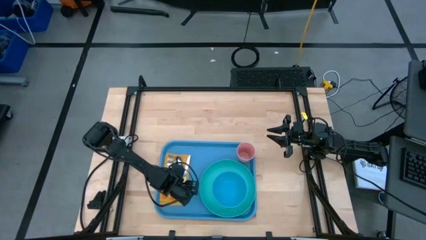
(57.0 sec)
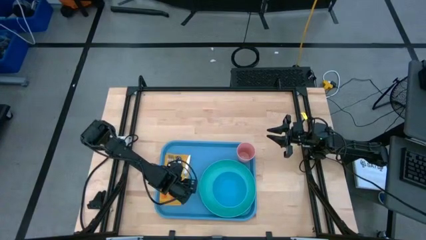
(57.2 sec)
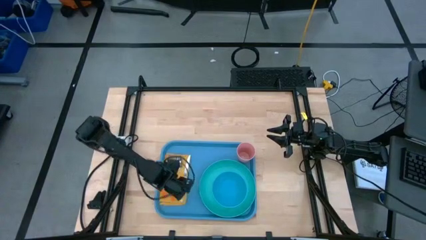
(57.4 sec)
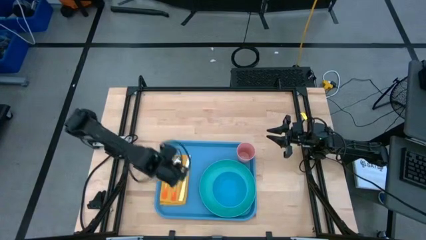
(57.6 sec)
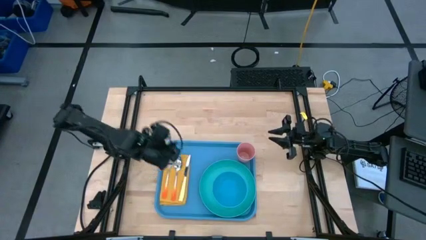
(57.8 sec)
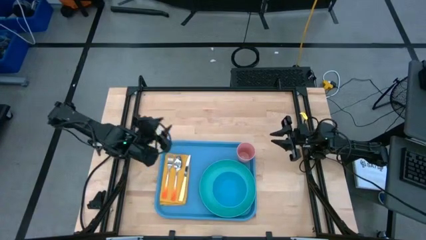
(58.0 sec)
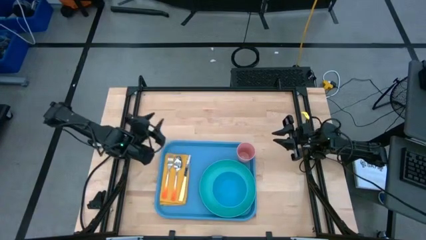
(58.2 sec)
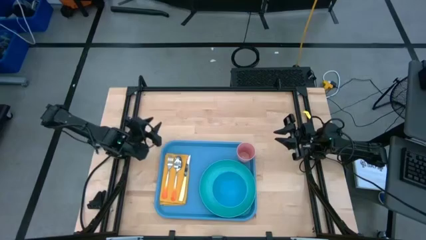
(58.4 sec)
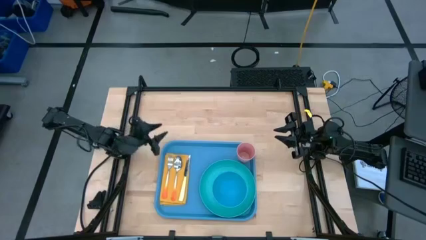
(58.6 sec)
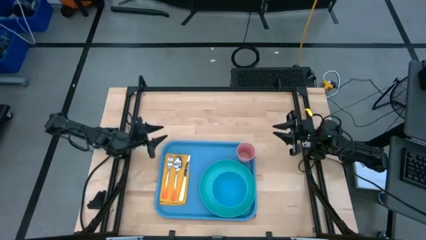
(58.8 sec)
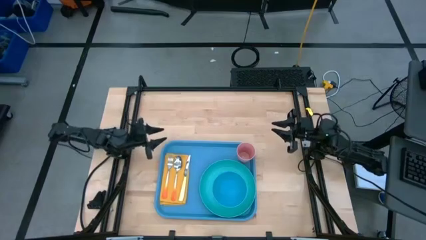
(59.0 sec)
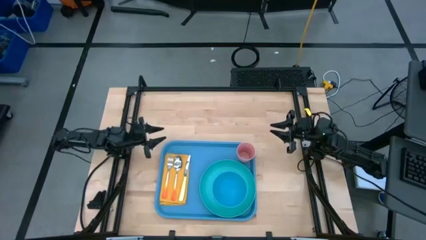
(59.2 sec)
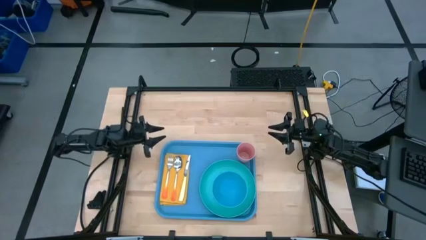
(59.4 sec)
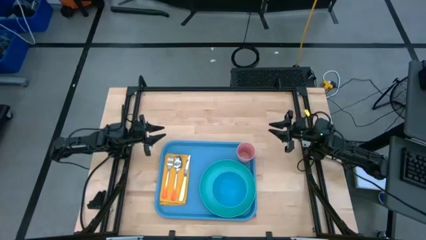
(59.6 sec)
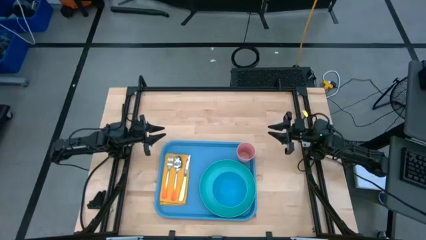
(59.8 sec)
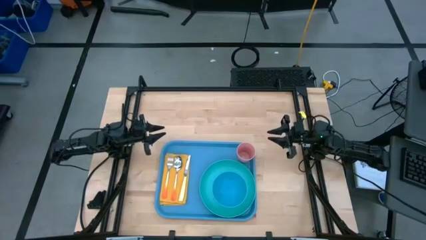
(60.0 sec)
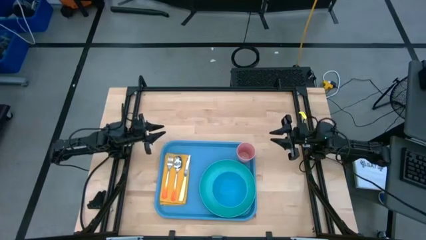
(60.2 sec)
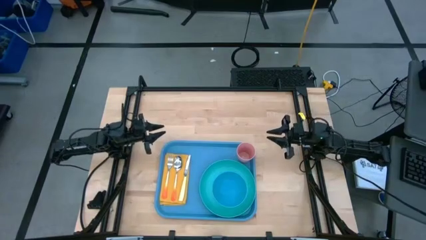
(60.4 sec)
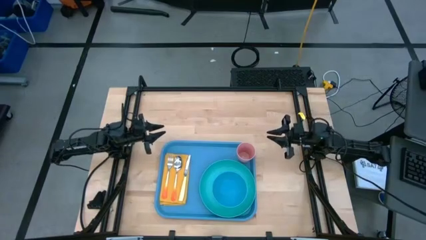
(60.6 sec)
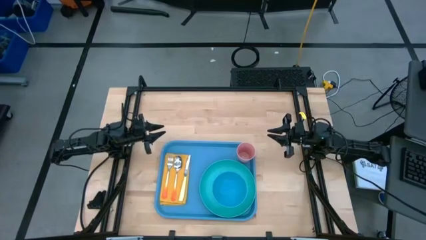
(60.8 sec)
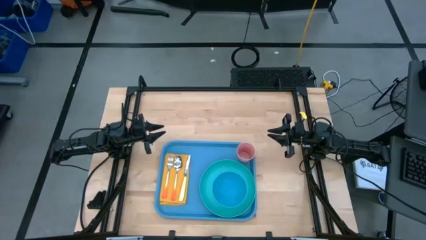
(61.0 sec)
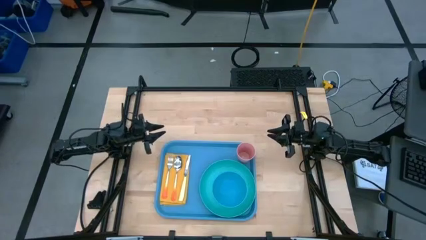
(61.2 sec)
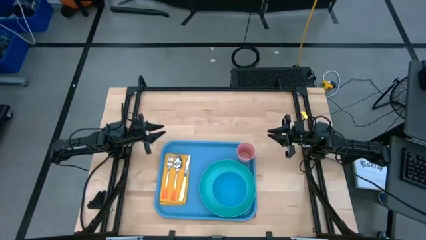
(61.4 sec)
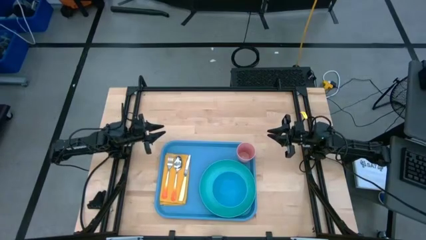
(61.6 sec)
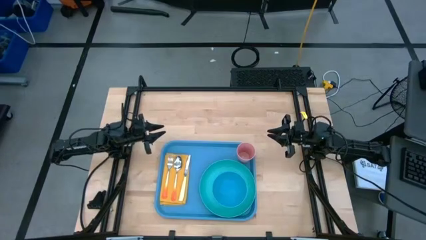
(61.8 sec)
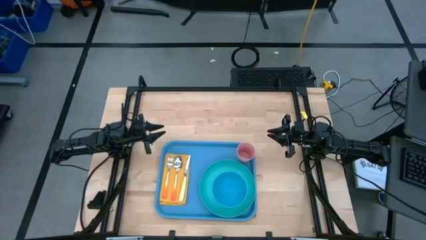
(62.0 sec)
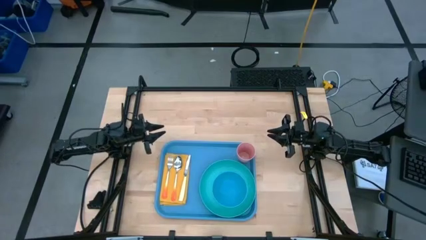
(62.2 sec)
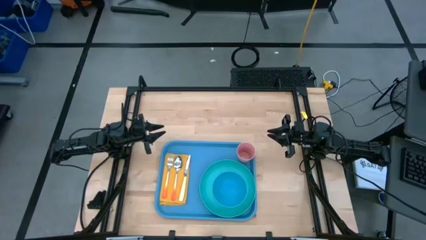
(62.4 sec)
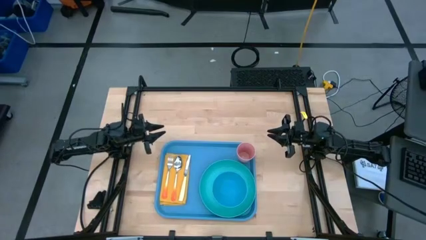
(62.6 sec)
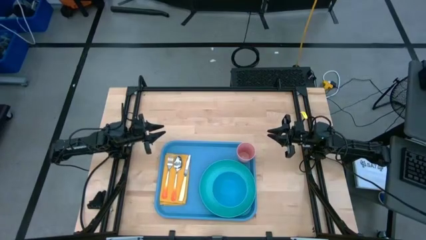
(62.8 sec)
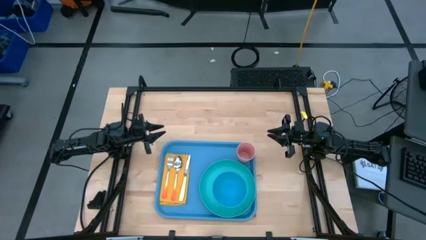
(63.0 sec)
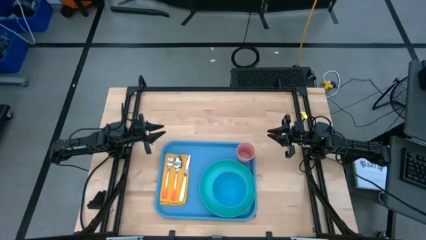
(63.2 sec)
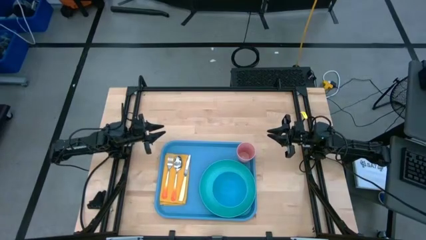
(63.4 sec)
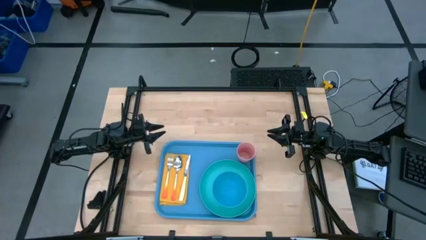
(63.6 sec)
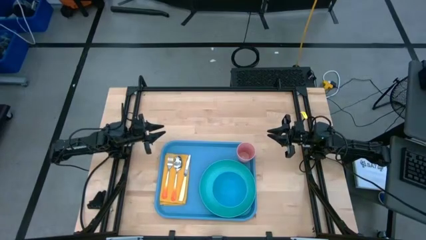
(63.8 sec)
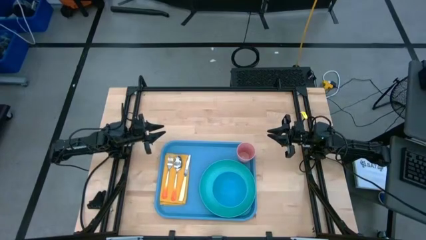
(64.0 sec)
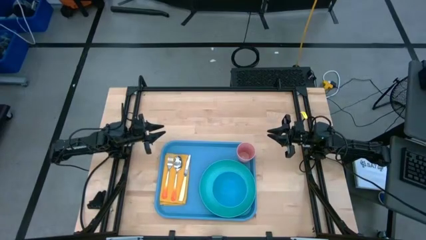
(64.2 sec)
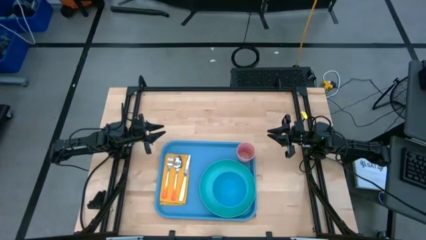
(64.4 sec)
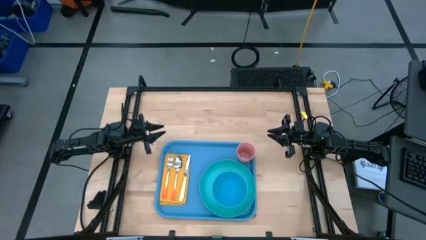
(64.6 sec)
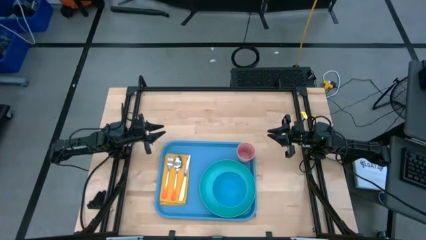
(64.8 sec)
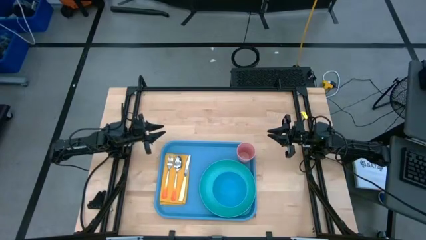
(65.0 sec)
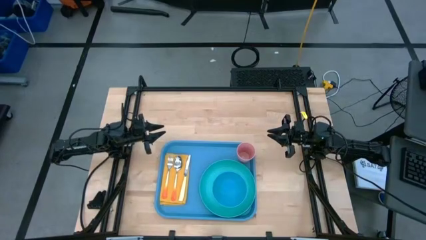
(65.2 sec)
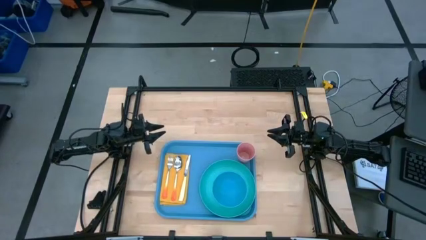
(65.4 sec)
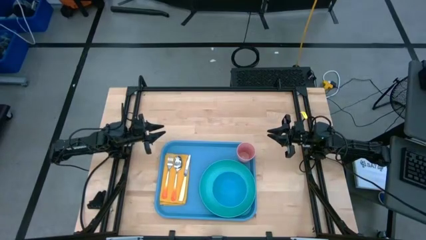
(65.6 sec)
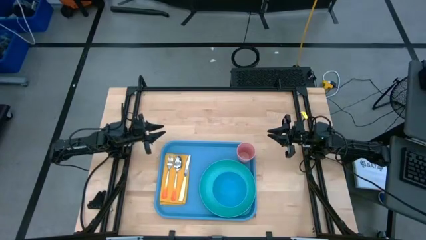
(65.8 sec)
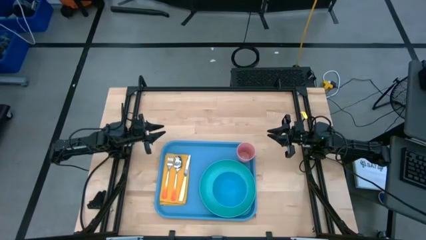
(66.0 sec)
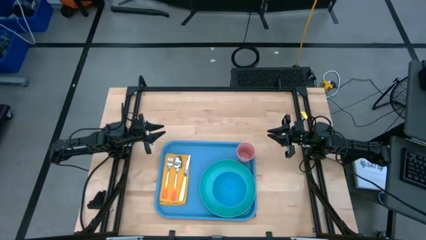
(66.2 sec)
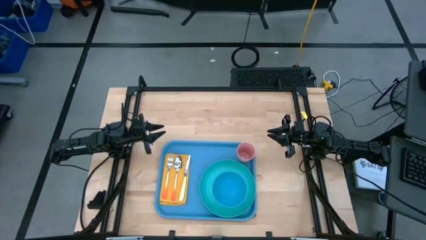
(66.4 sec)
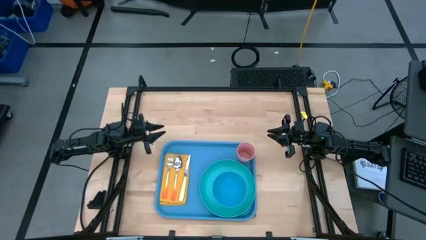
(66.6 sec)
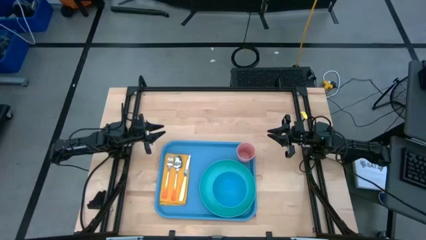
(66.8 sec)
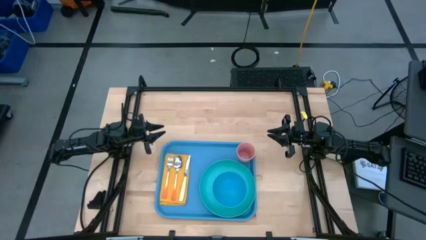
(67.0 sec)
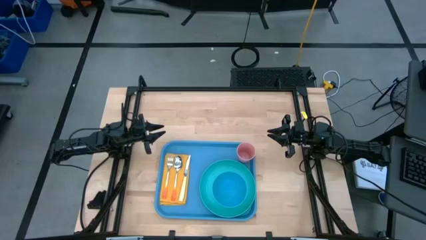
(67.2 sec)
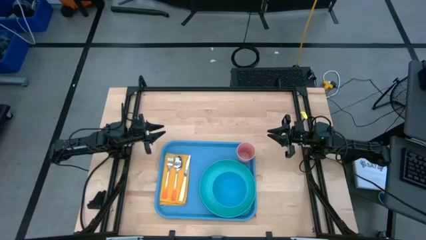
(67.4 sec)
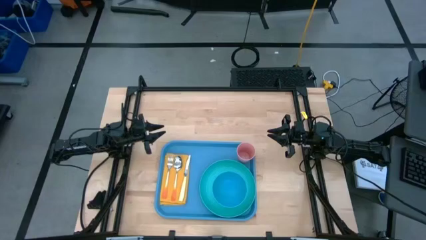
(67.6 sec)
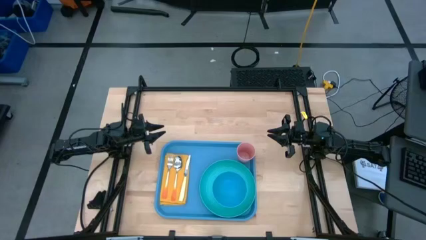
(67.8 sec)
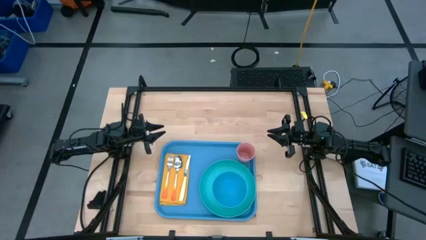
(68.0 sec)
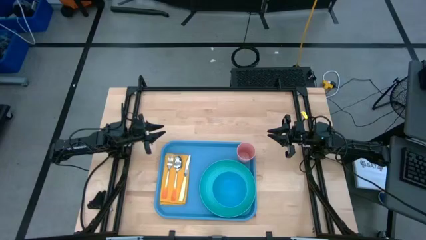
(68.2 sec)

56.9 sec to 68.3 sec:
Task: Set up tray
Return to Home Position

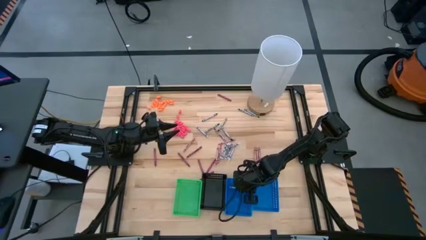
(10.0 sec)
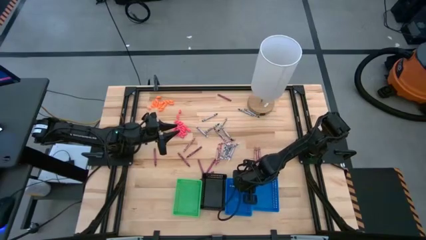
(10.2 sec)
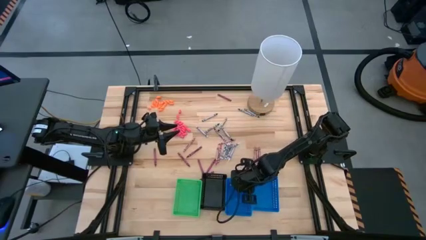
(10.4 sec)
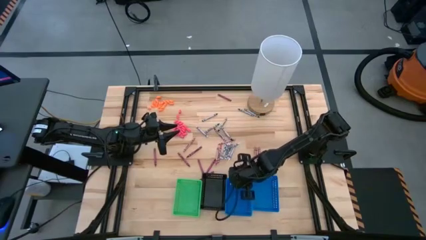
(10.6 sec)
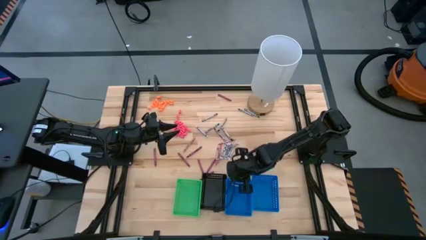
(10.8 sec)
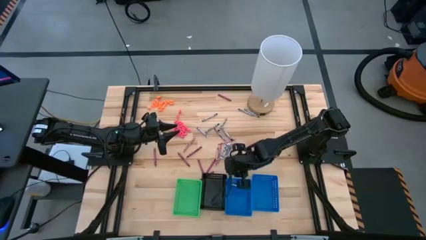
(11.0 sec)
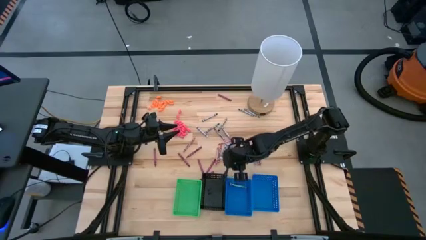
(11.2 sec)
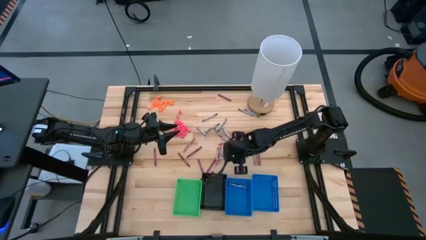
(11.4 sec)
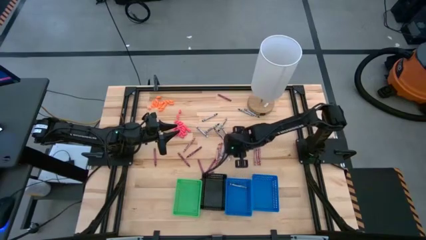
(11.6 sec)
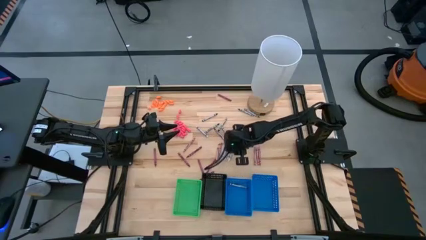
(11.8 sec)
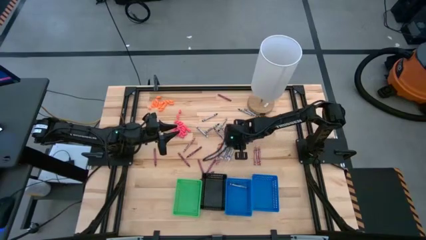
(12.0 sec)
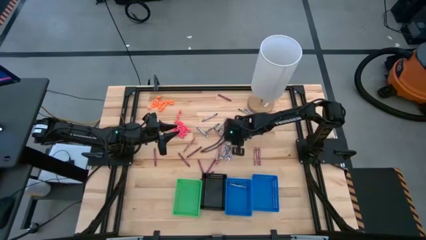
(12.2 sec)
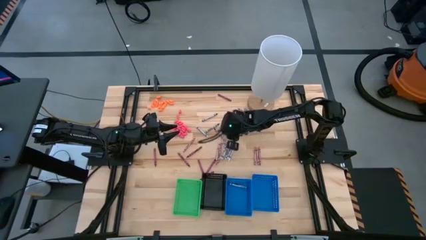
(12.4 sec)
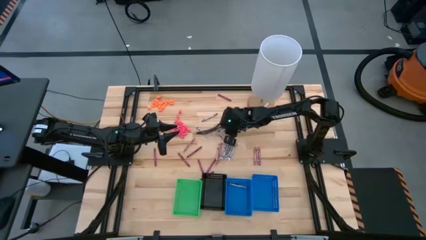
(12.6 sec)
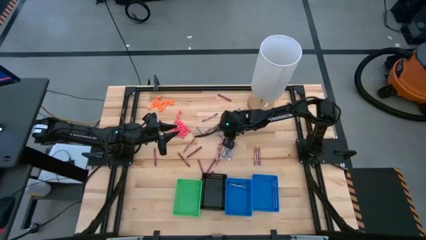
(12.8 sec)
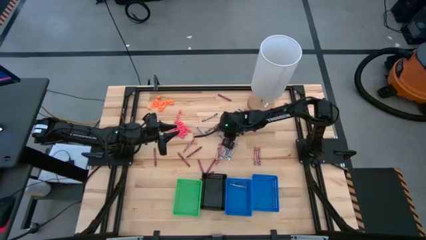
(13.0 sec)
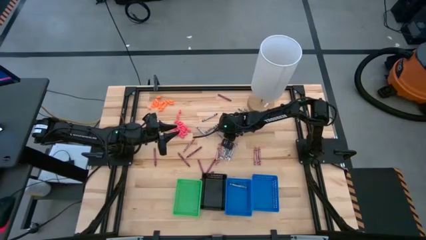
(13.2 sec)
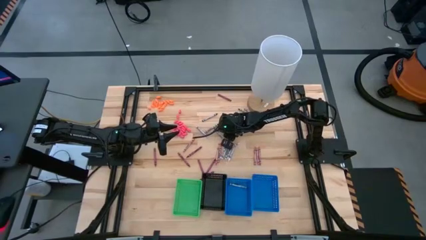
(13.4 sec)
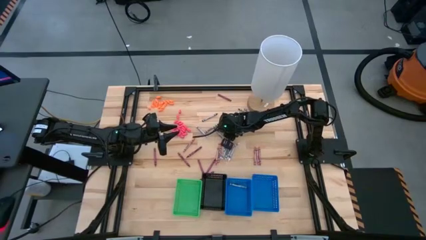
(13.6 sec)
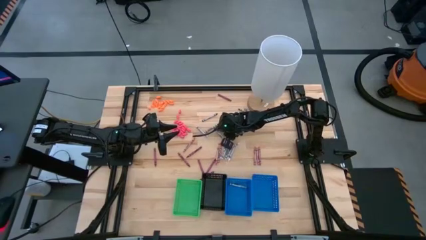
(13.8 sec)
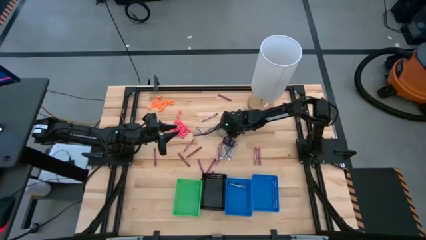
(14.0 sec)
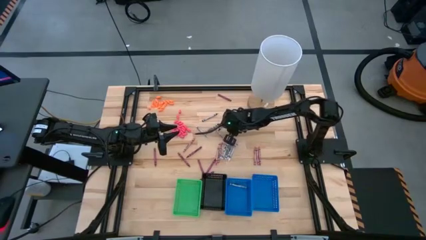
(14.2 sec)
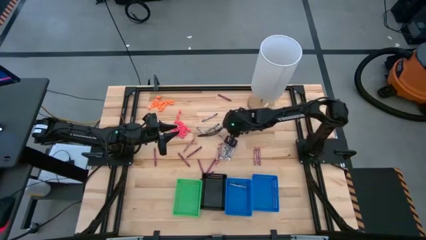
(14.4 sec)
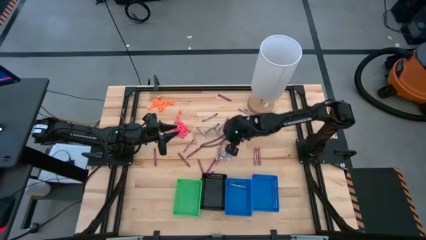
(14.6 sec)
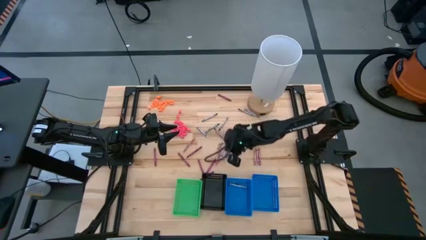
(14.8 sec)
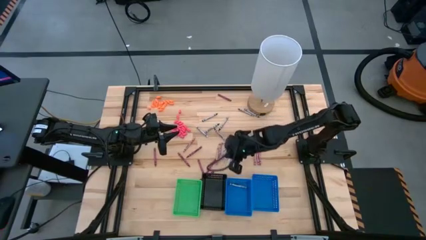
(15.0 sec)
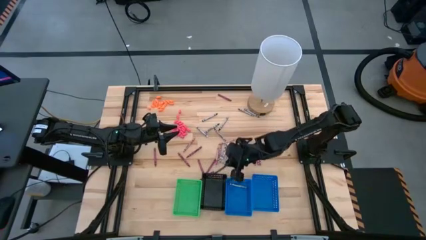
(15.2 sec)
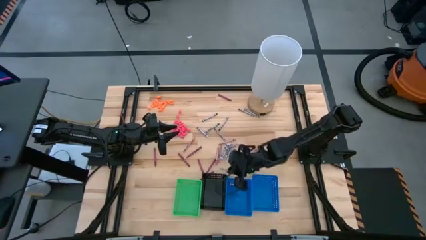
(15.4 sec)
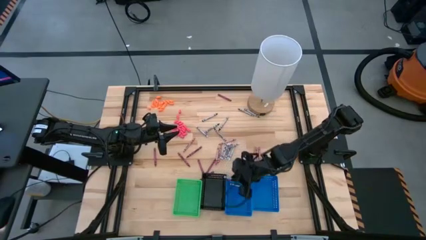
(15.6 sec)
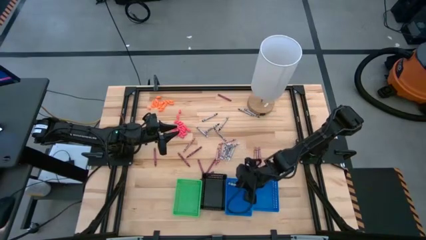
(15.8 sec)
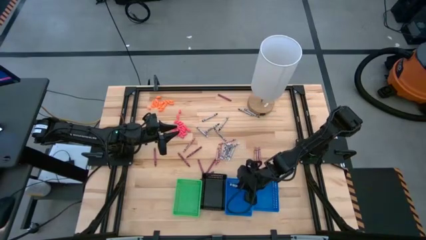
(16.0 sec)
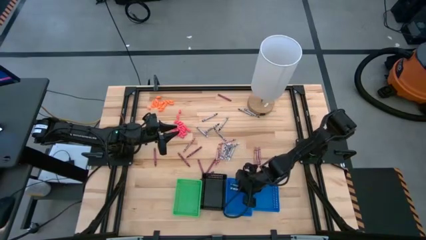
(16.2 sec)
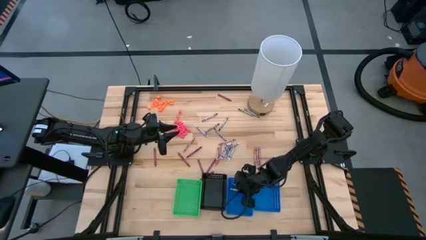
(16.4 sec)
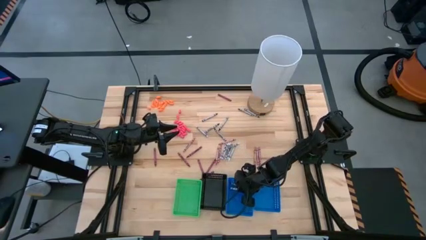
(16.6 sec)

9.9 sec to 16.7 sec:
Task: Sort crayons
Put the black crayon into the left blue bin
